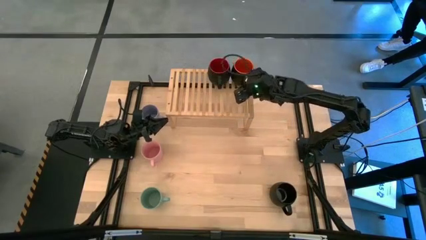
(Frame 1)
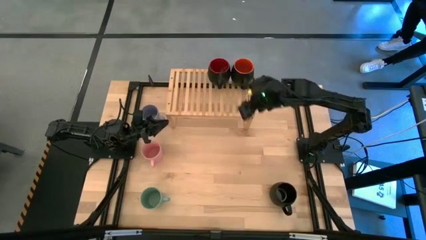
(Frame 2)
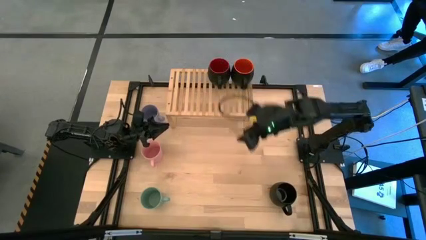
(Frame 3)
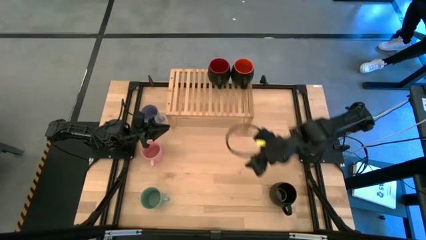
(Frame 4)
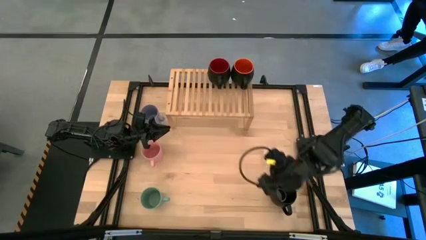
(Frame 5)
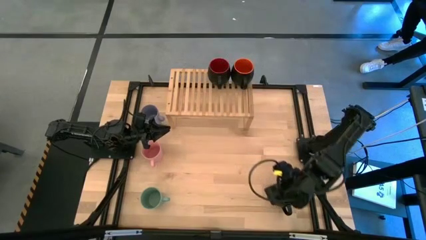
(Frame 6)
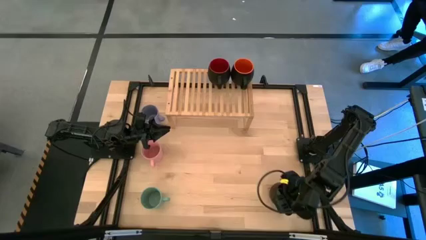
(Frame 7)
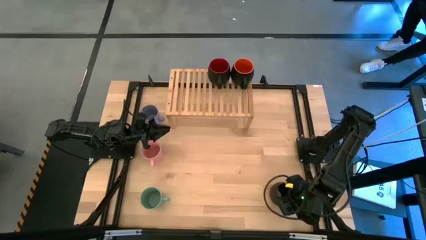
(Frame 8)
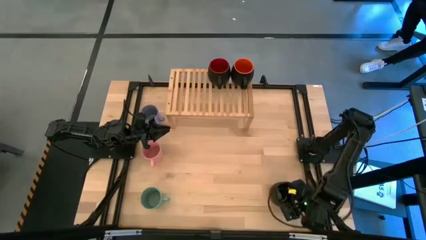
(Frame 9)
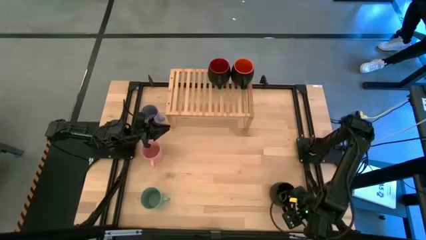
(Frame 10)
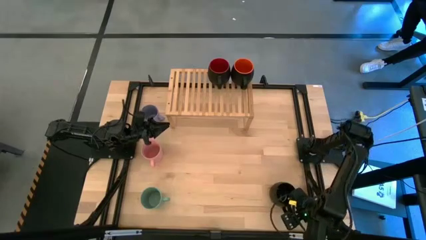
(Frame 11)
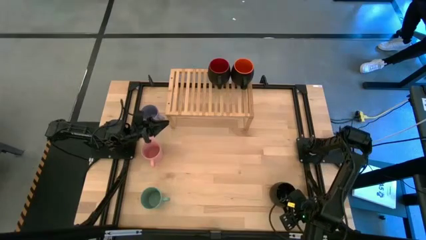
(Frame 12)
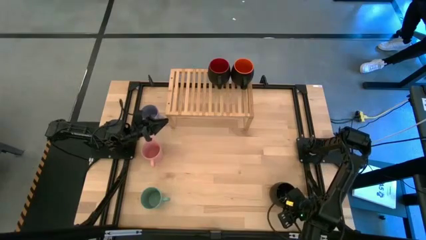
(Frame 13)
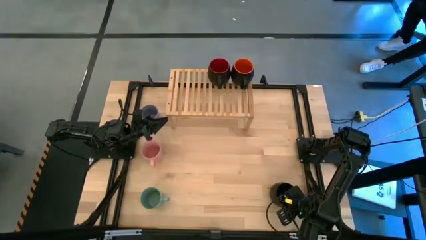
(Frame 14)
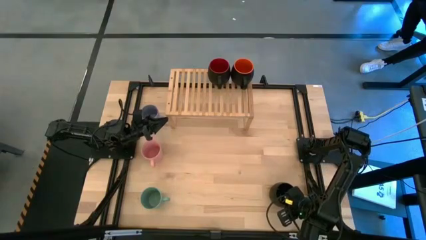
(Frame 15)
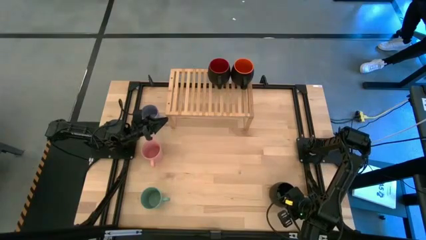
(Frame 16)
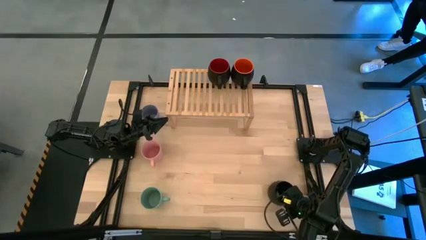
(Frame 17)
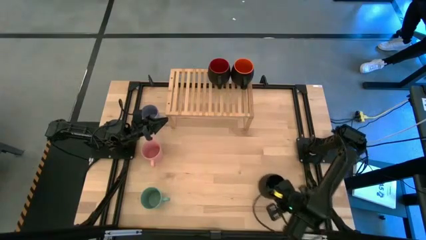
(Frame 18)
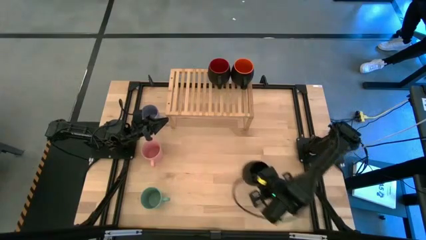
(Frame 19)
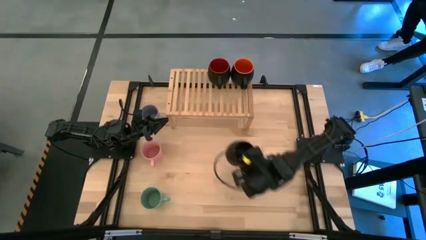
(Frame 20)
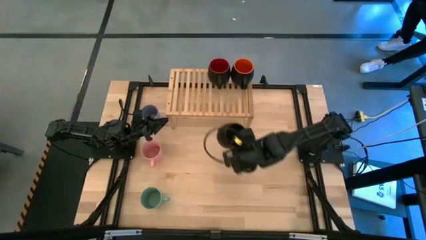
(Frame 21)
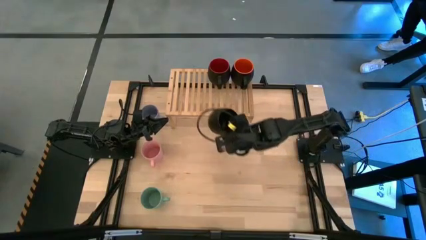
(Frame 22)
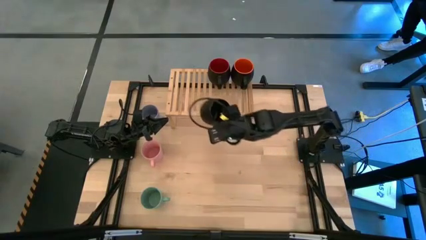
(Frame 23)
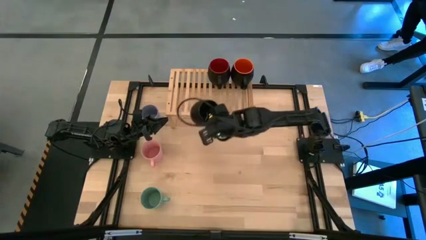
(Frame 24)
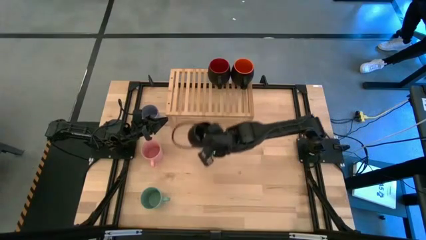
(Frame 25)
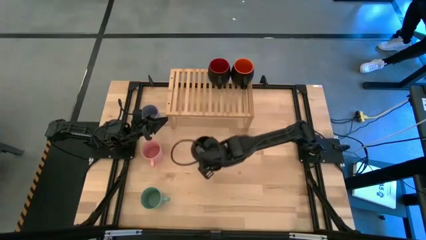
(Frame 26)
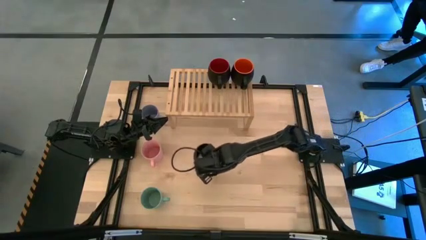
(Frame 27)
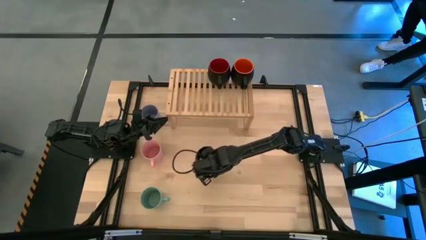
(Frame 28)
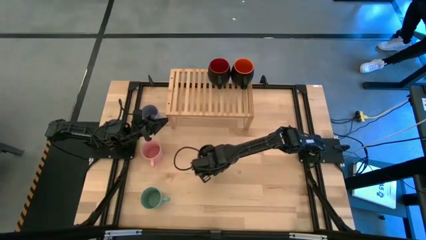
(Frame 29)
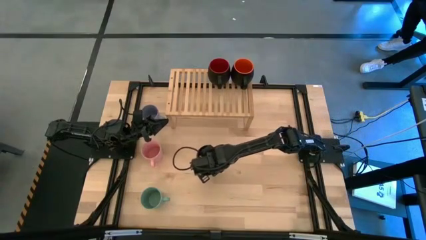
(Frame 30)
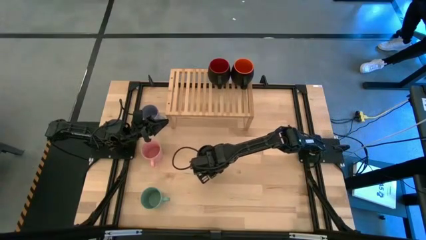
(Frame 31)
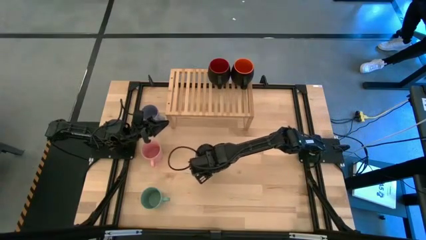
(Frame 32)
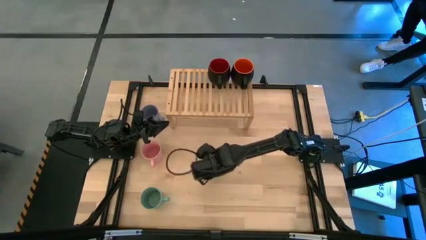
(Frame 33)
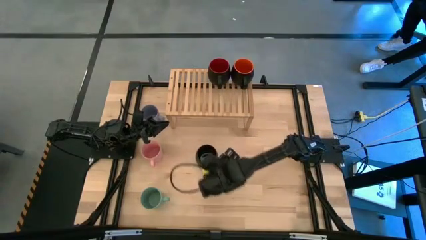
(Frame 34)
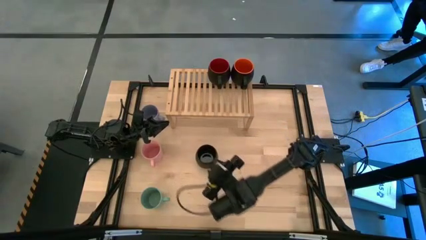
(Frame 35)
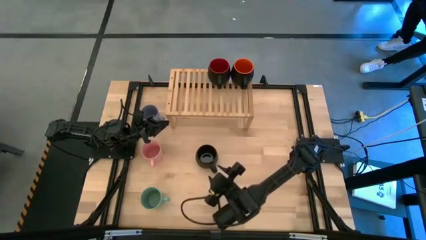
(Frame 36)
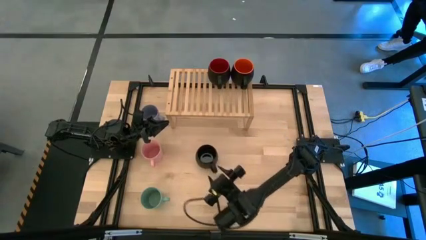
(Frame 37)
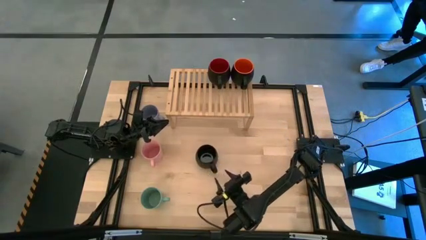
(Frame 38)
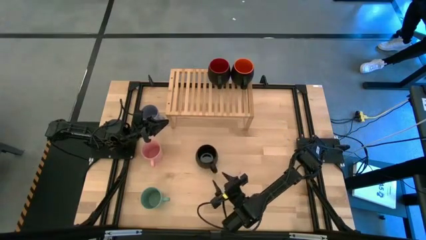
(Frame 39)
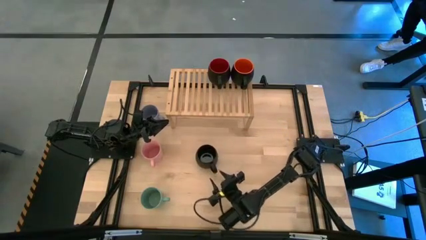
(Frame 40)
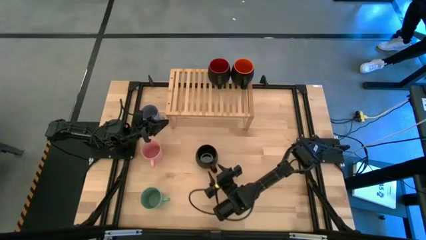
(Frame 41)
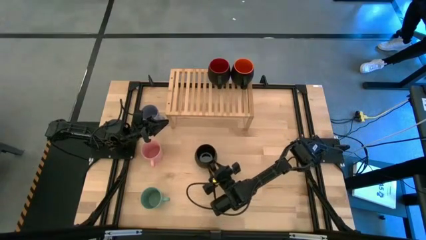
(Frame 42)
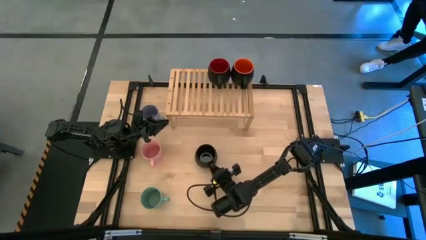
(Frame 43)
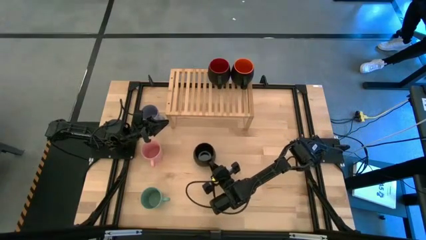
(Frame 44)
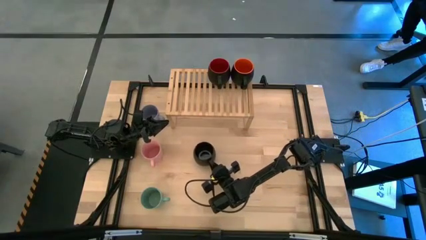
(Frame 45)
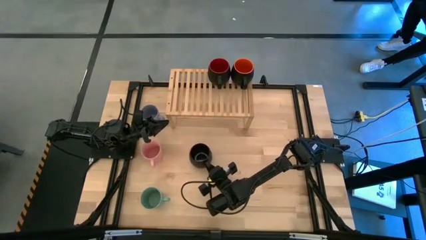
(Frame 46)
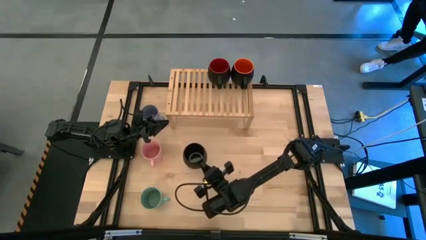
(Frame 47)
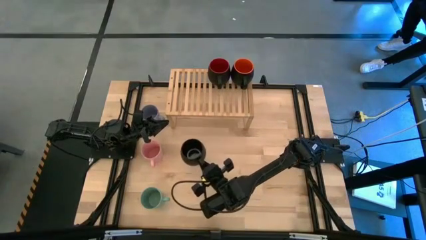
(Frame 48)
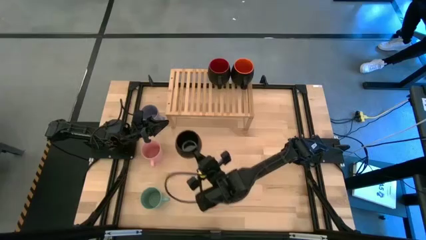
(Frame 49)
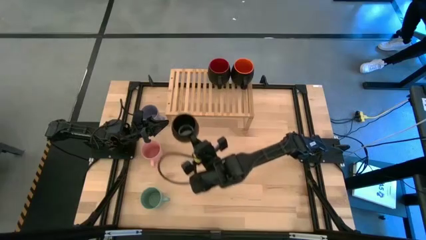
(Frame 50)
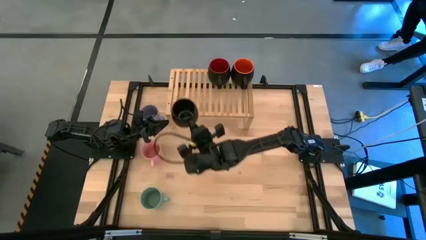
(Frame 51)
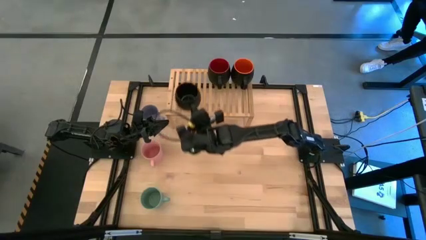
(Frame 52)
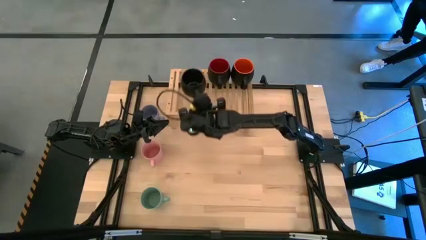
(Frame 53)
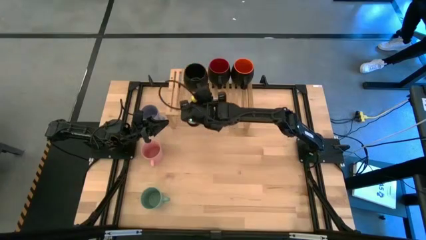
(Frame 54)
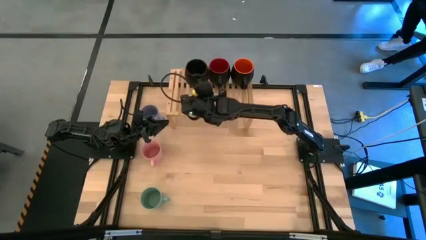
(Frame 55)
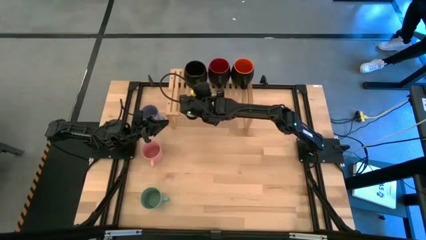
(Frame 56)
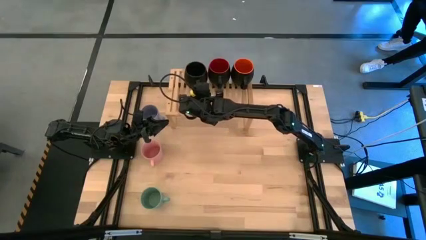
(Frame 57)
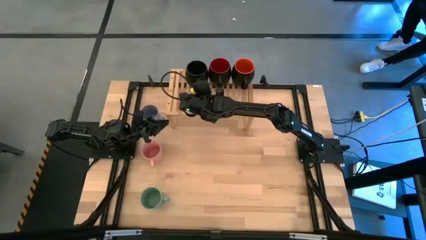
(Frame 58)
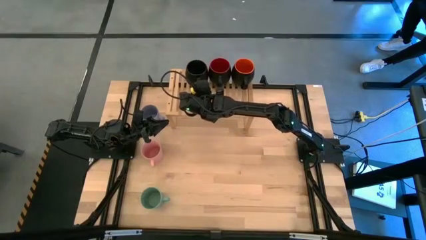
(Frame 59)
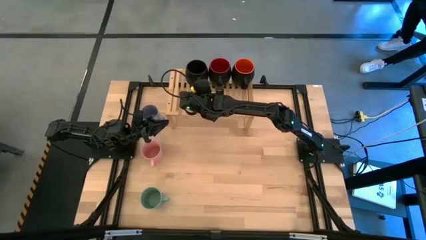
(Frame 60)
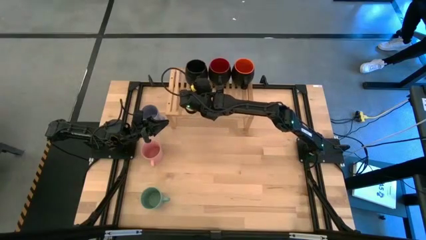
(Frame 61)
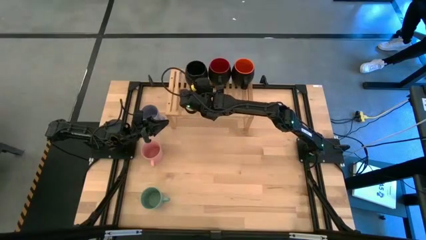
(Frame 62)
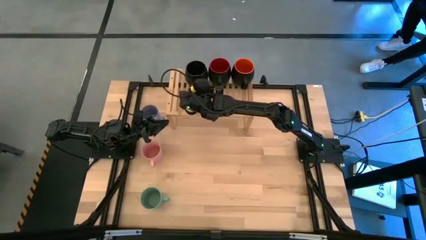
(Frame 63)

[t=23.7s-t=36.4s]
Task: Place coffee mugs
Put the black mugs on the shelf

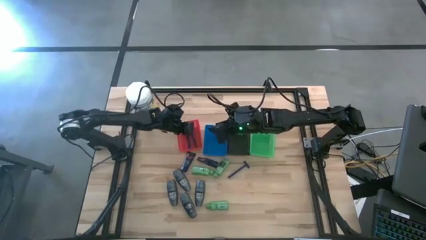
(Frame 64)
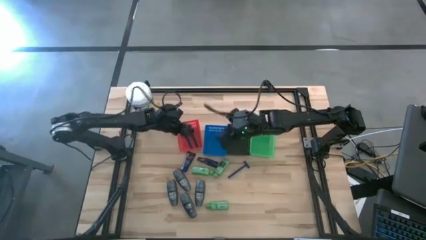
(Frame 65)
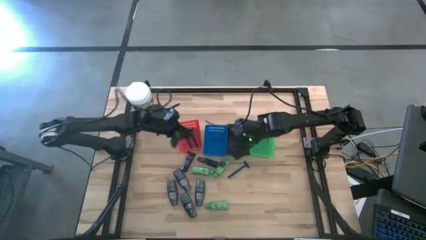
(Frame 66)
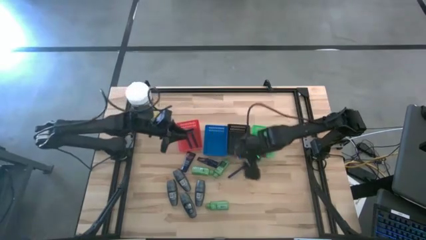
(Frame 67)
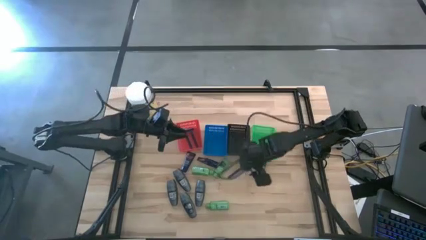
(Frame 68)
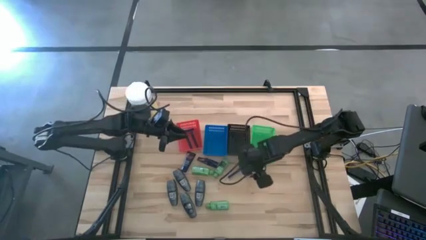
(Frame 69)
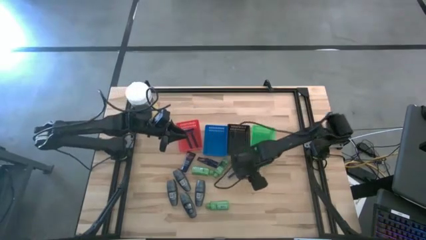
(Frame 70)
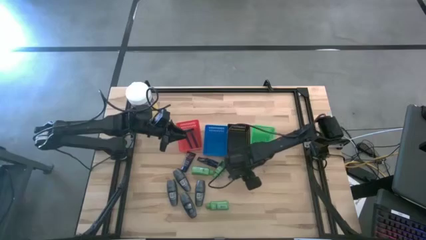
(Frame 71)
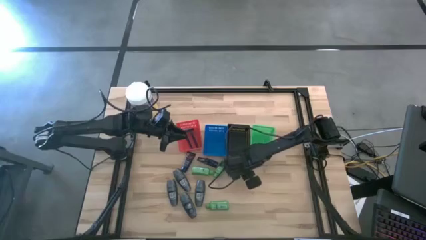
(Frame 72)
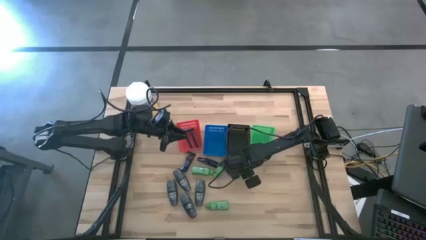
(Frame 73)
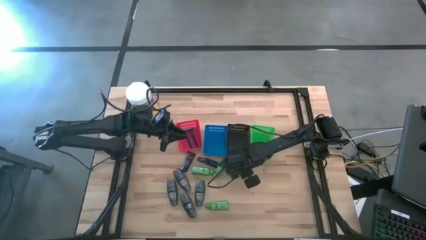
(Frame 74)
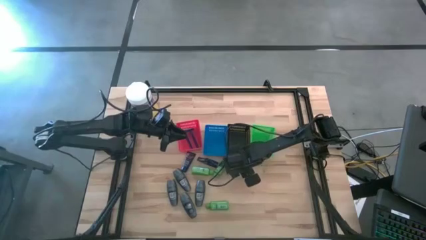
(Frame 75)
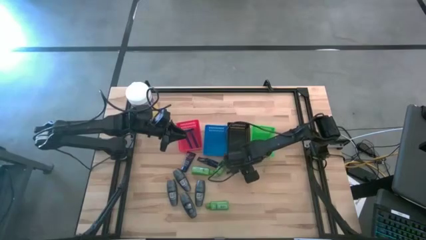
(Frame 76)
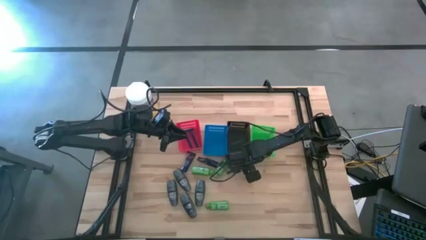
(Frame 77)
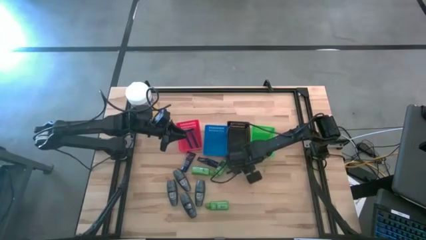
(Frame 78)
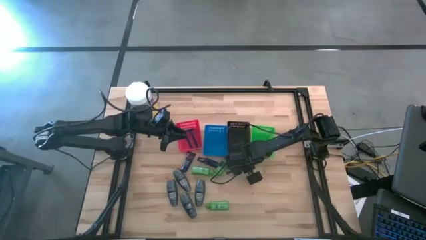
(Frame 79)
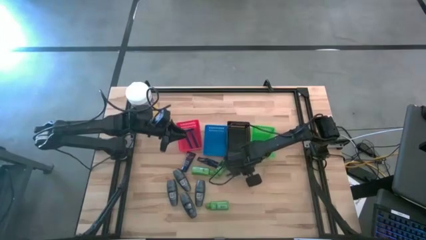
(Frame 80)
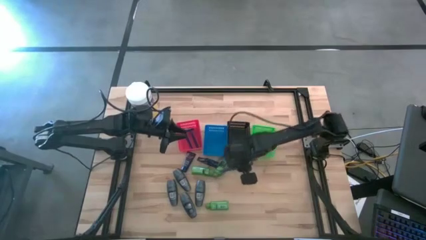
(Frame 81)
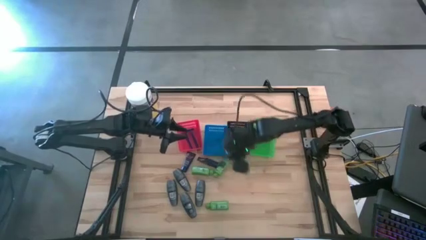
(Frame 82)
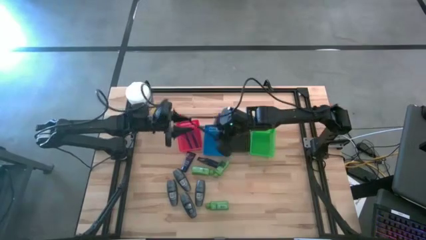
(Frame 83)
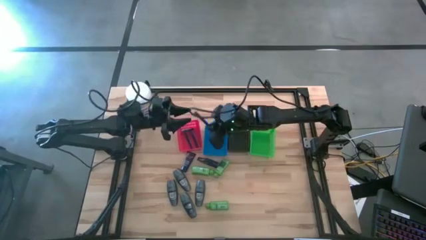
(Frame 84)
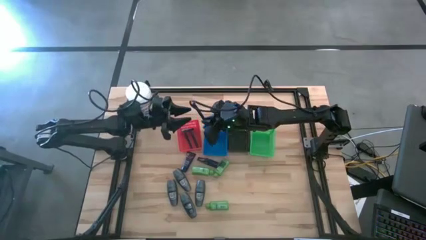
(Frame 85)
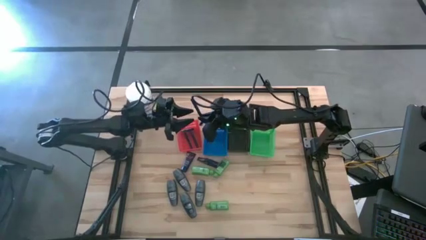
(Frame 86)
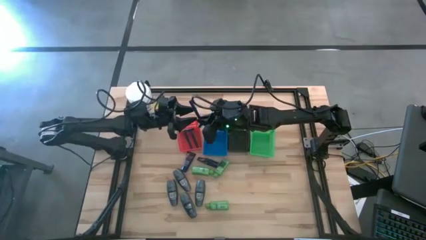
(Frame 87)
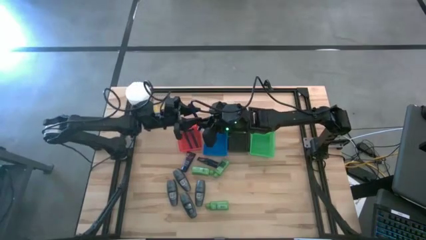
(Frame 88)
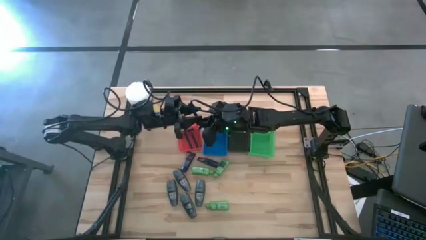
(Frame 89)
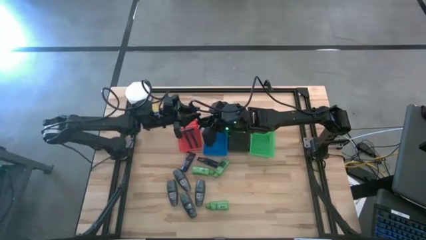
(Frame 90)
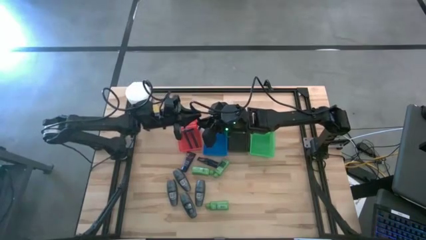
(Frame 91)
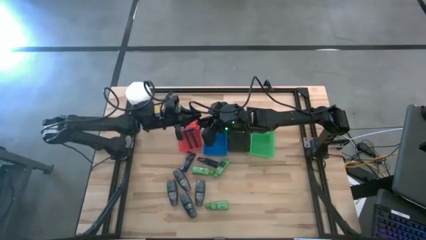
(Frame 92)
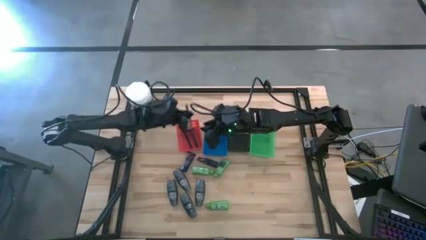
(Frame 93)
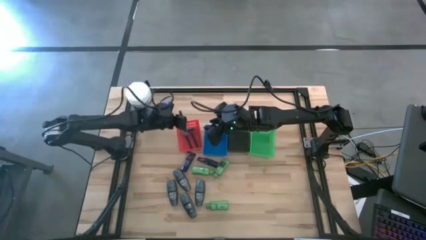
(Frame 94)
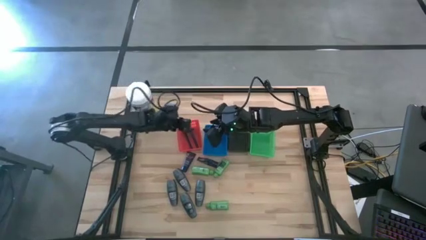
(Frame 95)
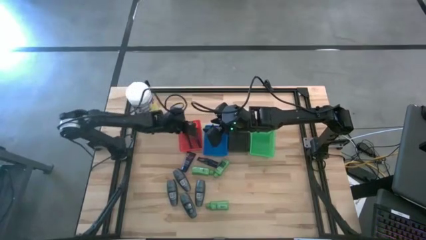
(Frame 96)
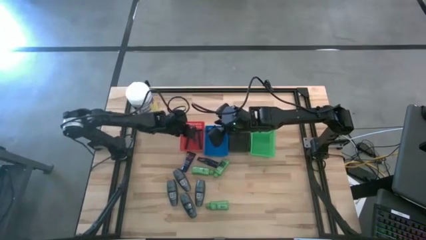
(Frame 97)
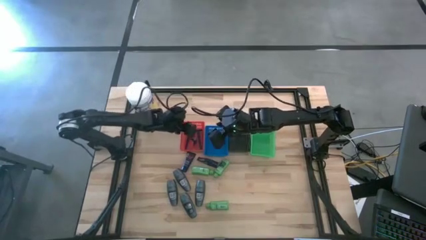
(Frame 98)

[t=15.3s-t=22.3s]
Task: Pick & Place Travel size toiletries
Put the razor into the red basket
